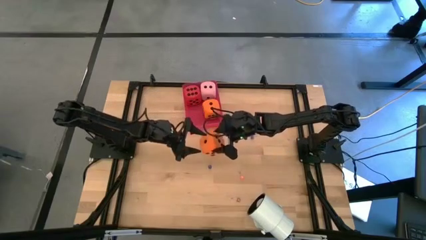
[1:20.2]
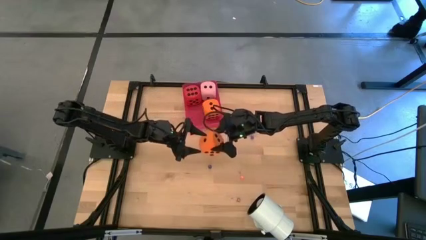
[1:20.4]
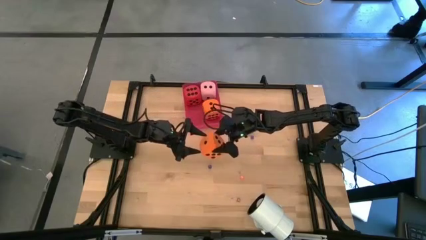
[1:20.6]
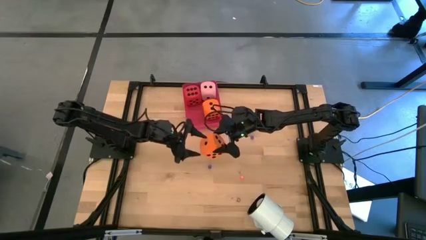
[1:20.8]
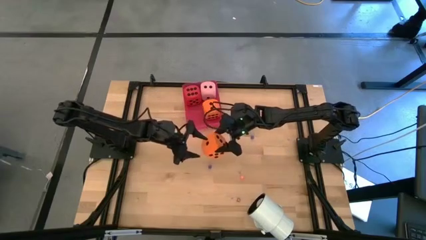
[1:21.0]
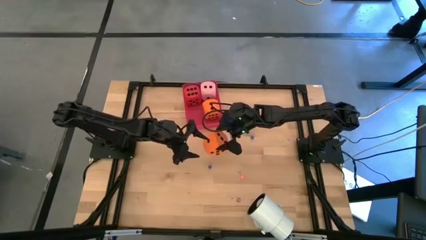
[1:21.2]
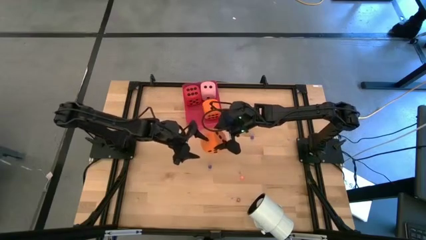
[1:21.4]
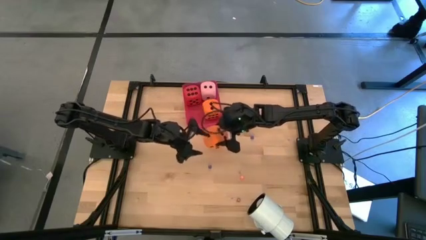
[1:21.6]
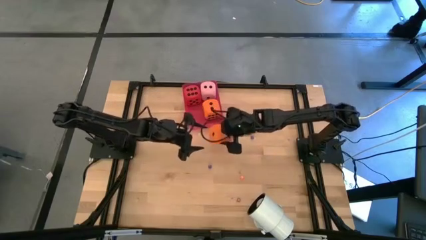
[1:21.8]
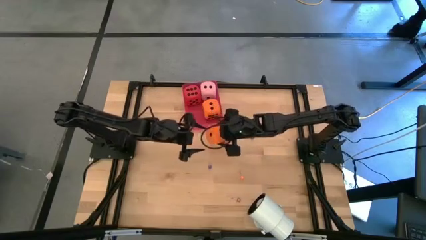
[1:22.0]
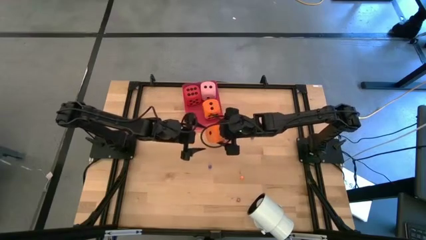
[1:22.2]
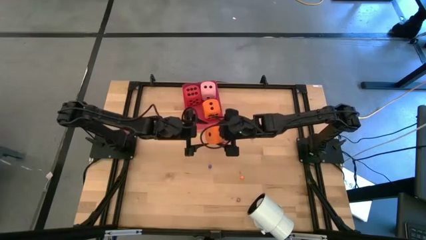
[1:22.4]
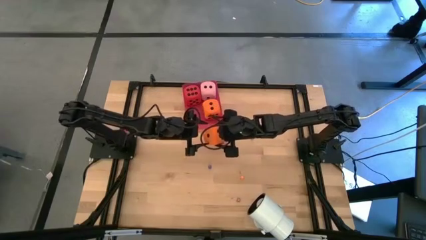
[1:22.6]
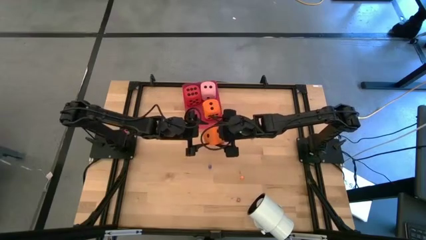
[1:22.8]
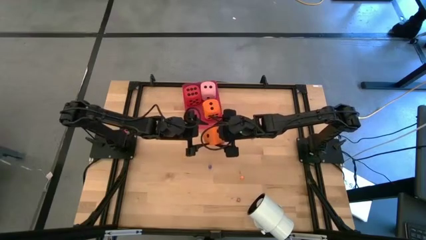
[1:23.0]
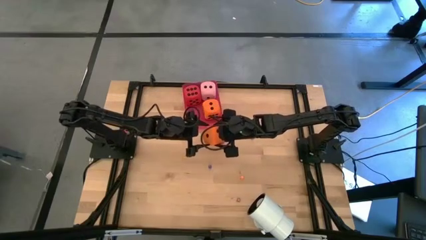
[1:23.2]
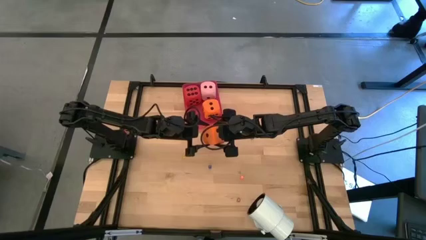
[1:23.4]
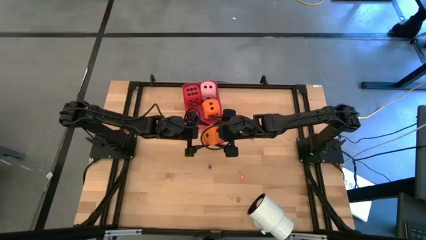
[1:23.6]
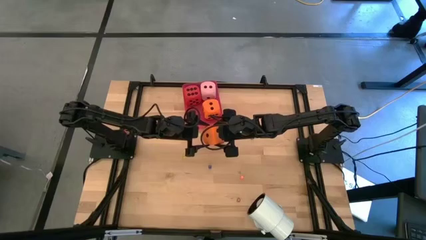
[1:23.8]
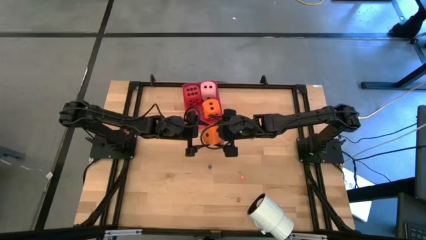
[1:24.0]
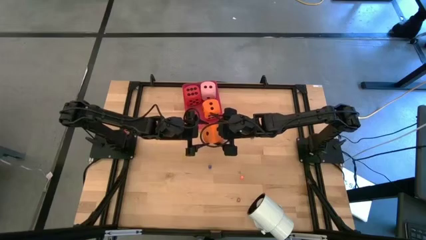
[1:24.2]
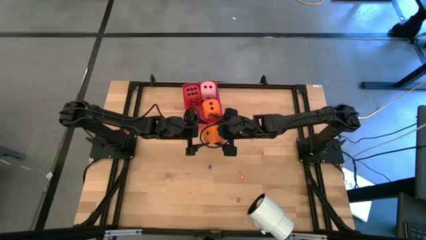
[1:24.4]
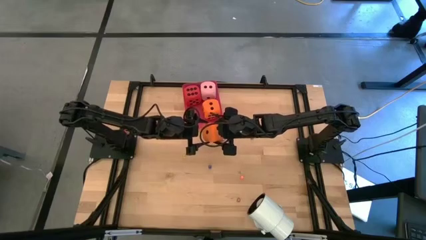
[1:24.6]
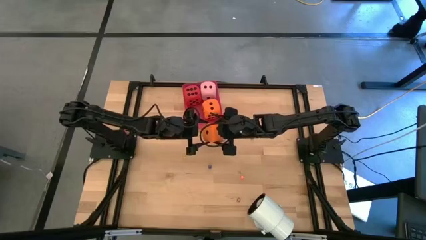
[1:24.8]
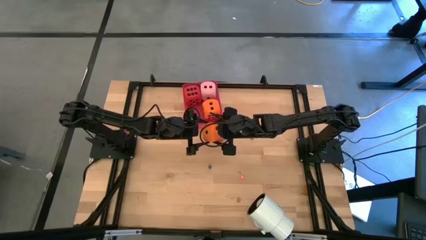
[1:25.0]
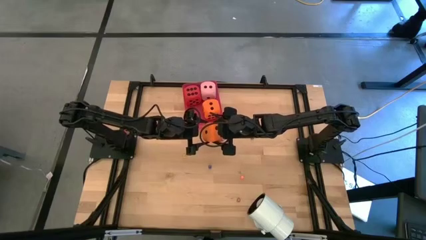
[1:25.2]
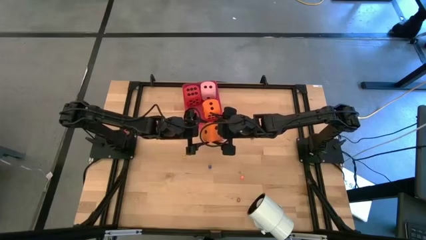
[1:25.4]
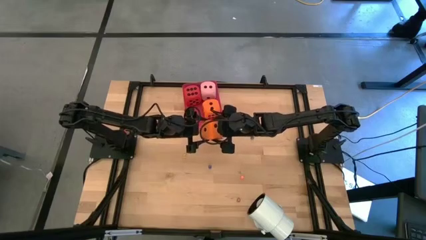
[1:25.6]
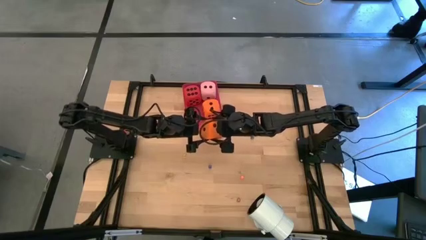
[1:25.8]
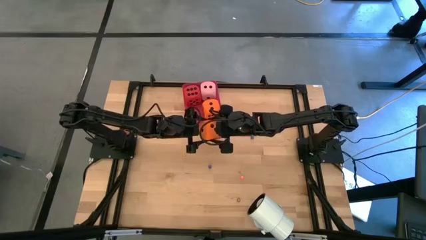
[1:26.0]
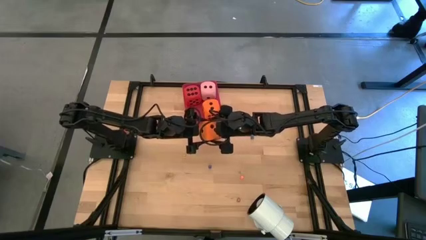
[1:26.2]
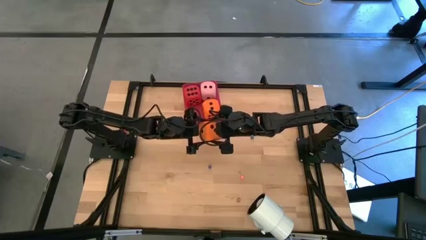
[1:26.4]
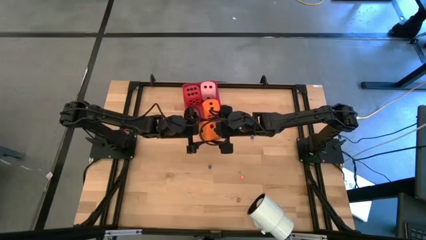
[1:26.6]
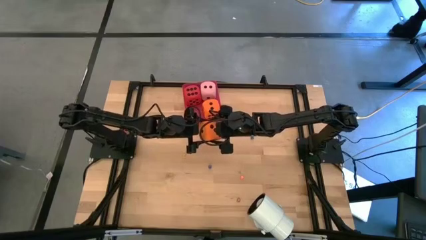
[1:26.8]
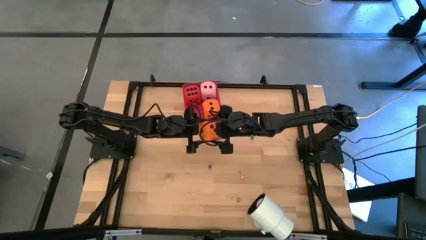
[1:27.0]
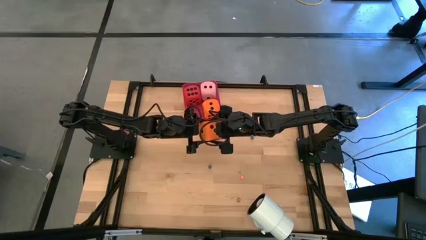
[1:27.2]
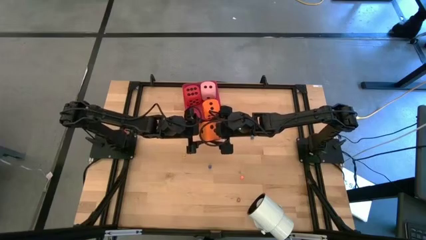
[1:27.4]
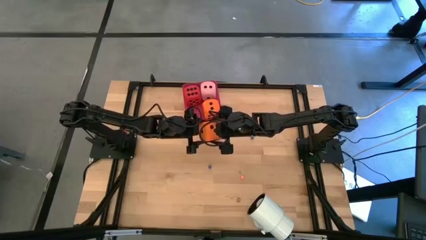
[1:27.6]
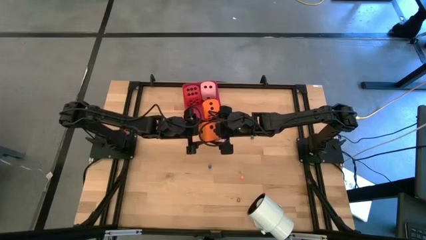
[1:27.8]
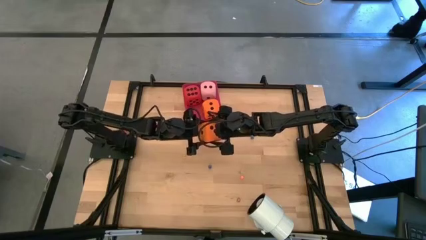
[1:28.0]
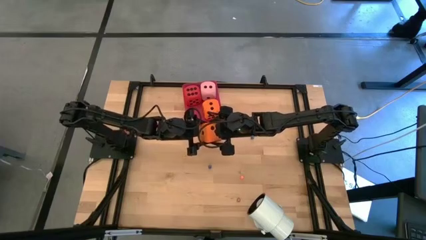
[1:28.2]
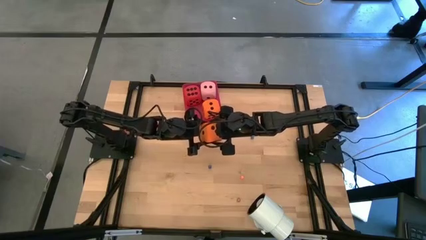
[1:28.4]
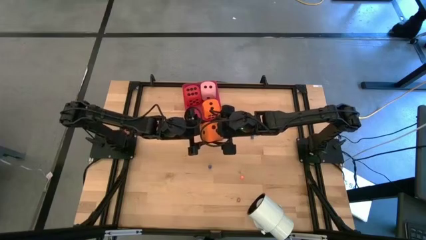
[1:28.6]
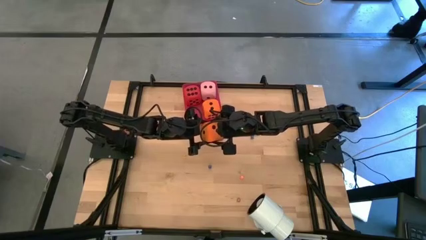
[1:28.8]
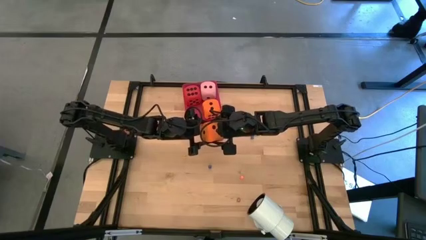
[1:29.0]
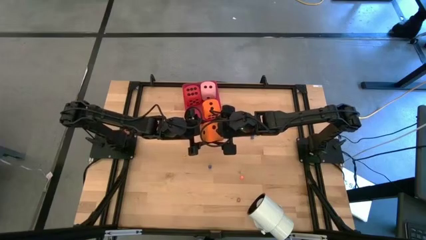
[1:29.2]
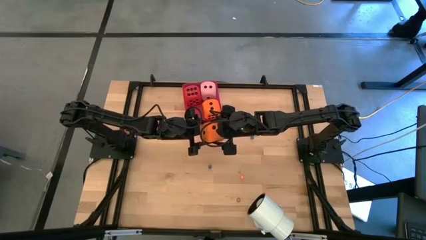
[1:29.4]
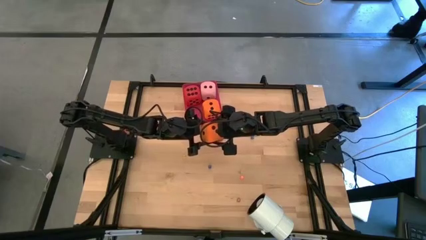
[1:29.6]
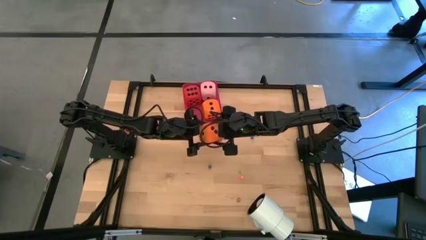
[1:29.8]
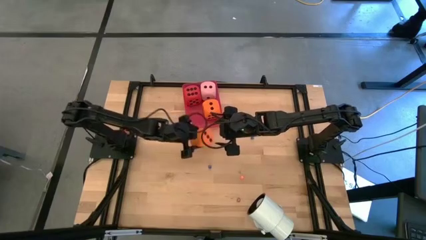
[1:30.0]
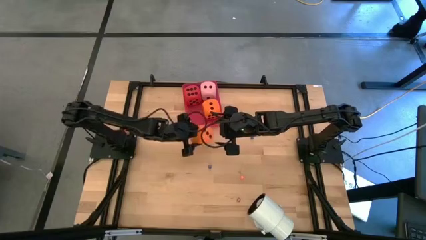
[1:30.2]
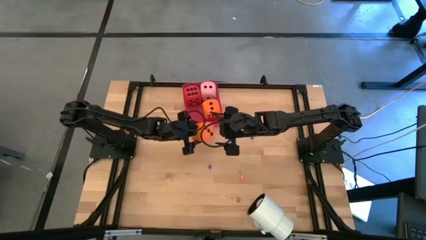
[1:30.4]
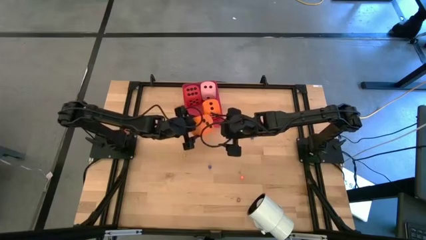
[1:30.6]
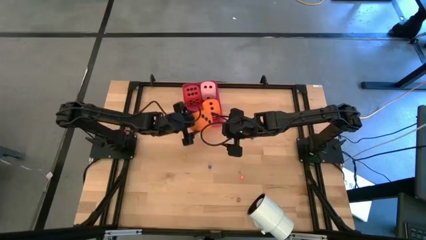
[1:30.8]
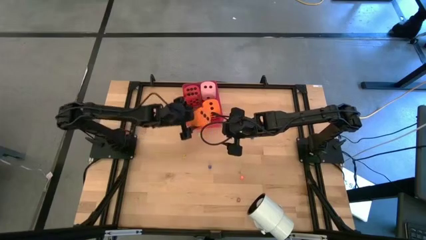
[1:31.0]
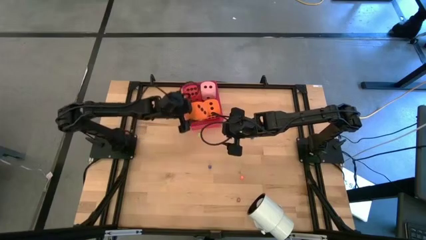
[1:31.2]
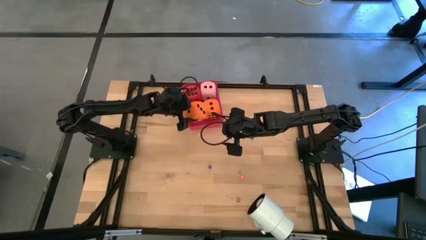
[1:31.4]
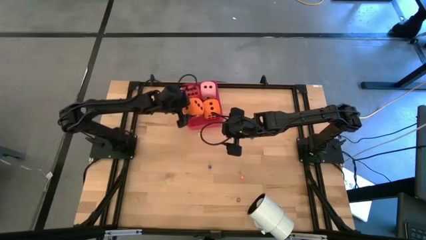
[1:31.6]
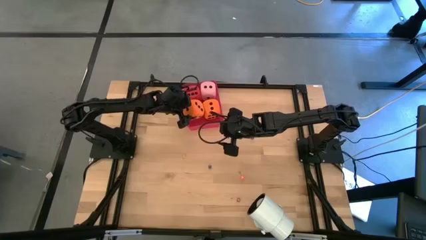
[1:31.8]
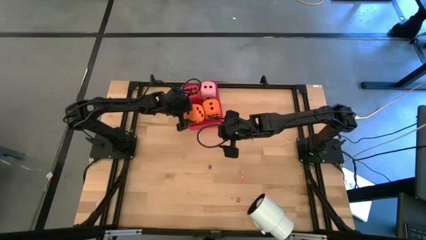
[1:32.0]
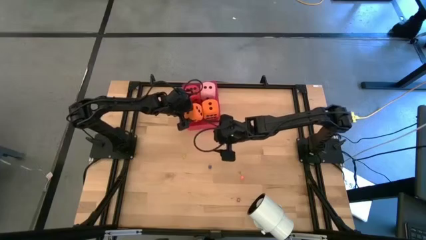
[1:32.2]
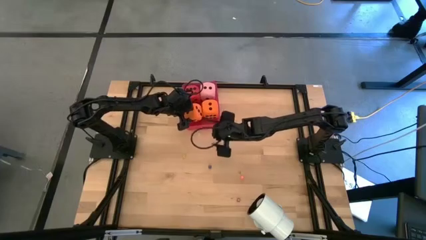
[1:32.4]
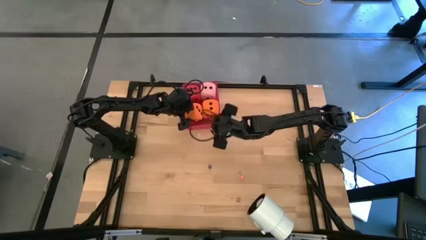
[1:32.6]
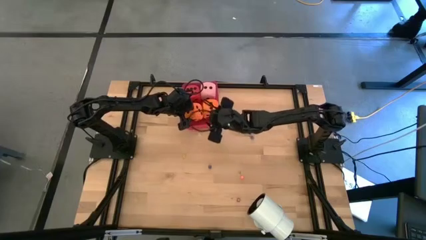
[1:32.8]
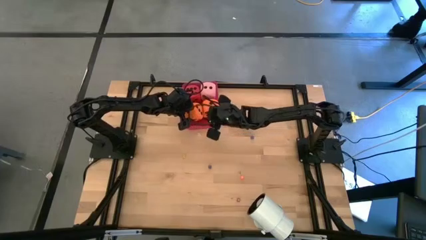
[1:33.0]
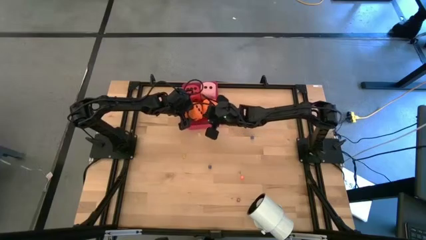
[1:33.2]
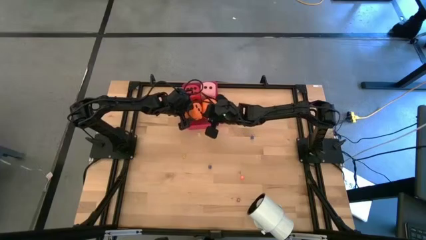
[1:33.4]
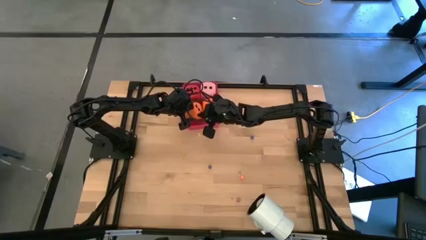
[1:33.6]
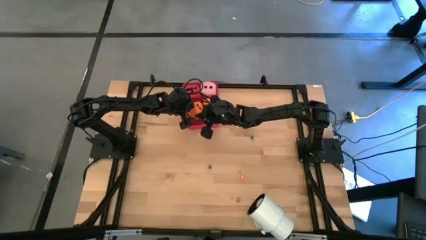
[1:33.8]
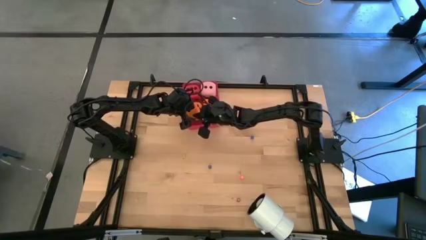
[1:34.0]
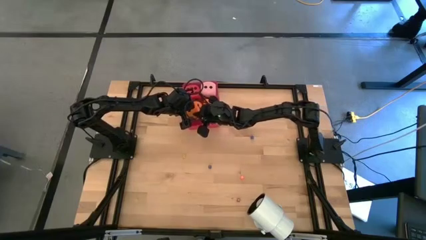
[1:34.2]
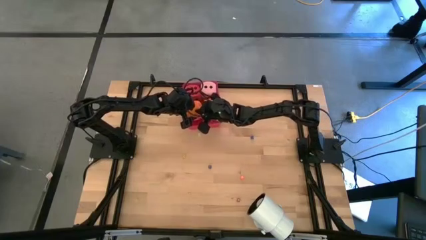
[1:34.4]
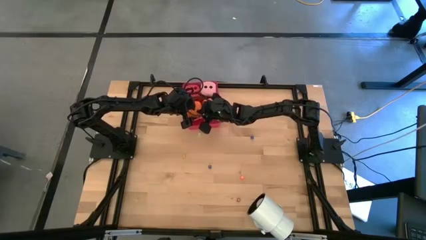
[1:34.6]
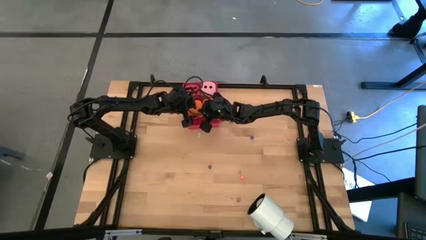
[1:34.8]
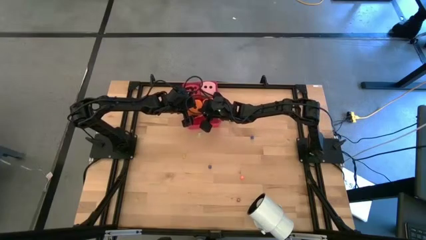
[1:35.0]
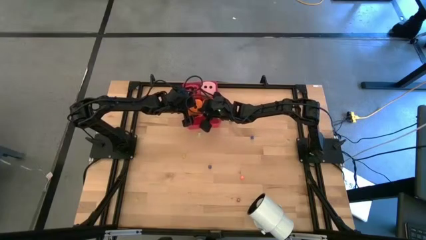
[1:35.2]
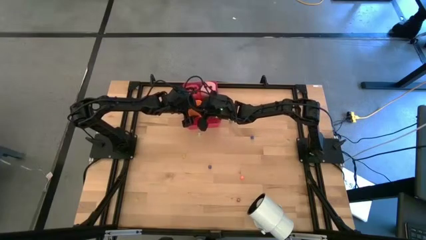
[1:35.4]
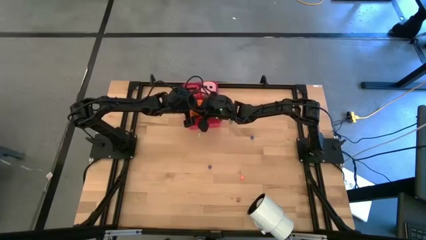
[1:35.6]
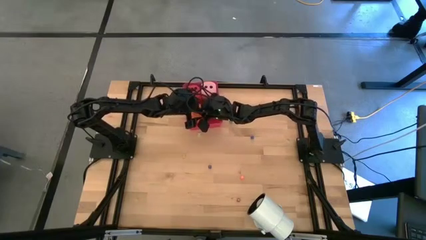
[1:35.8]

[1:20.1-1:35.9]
Task: Pick & Place Dice
Put the big orange dice into the red bin
